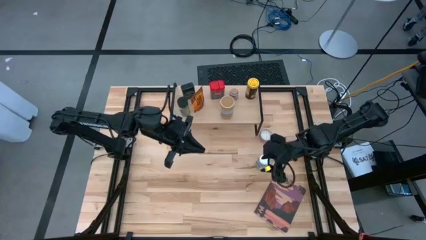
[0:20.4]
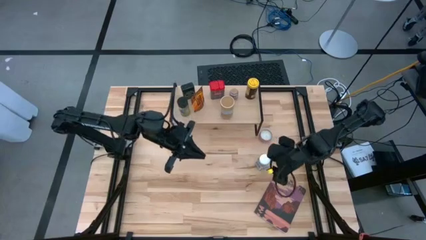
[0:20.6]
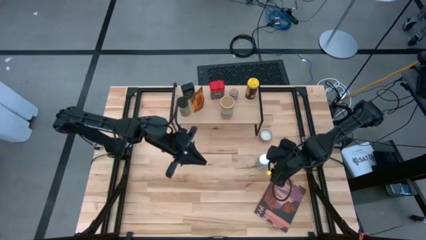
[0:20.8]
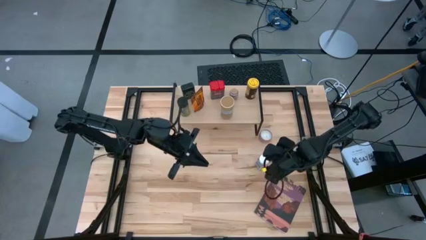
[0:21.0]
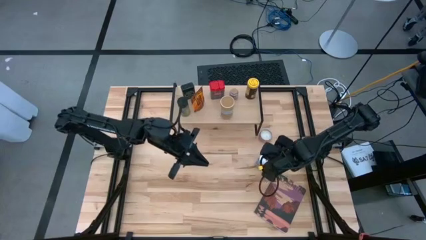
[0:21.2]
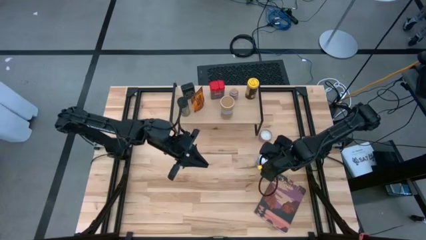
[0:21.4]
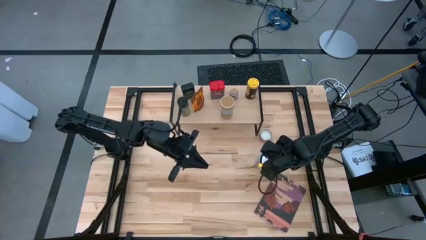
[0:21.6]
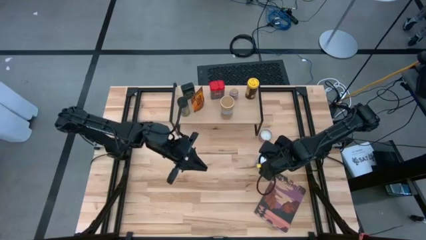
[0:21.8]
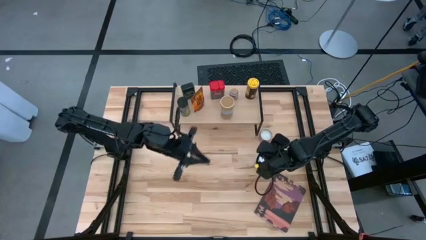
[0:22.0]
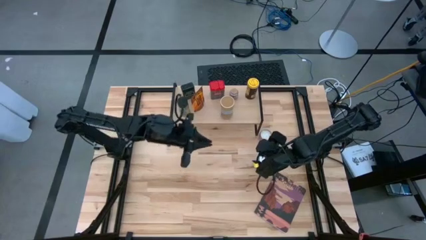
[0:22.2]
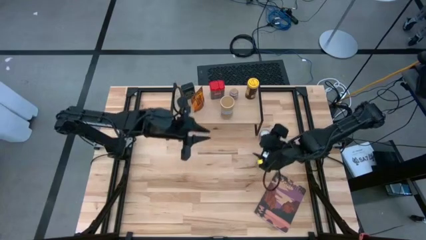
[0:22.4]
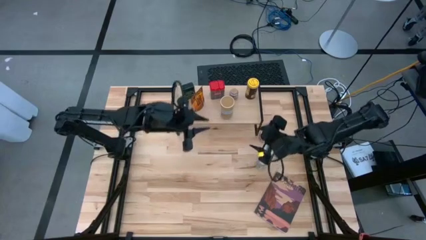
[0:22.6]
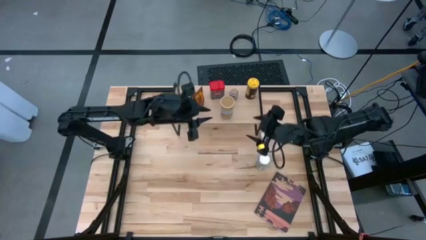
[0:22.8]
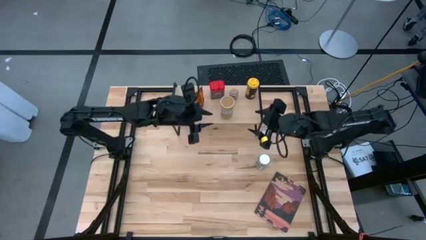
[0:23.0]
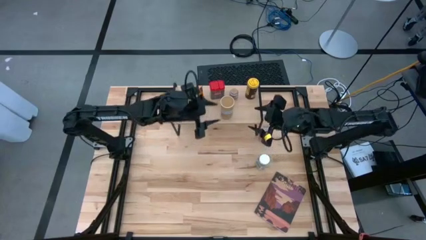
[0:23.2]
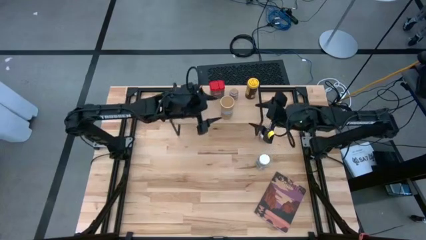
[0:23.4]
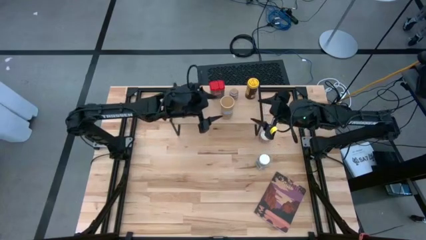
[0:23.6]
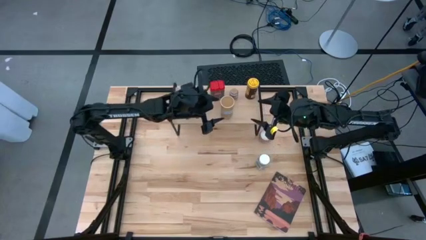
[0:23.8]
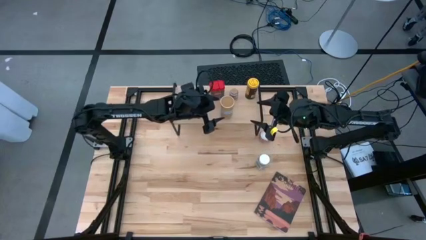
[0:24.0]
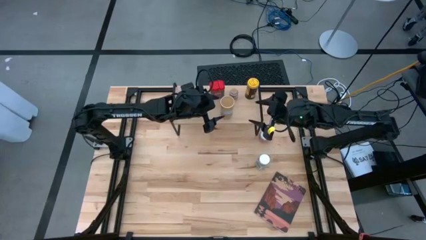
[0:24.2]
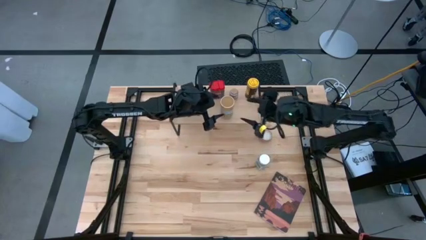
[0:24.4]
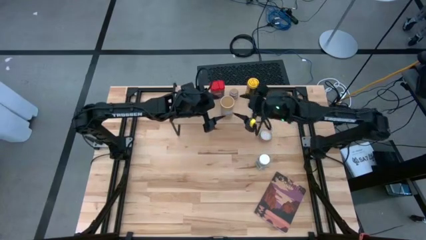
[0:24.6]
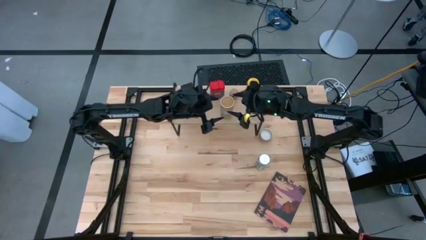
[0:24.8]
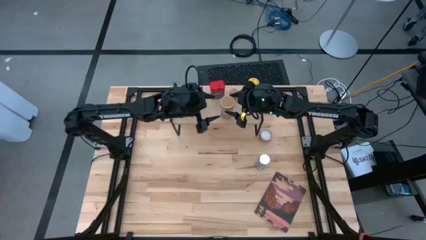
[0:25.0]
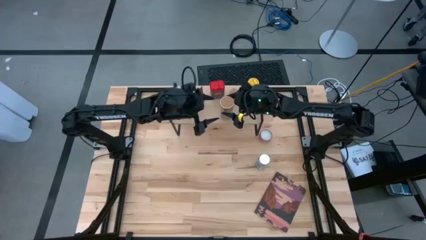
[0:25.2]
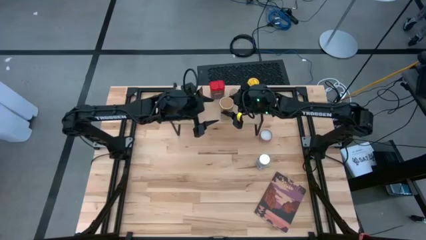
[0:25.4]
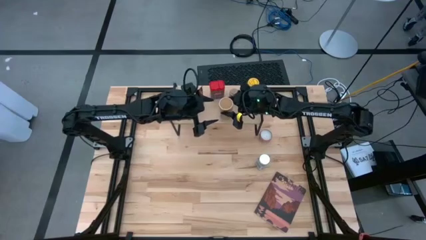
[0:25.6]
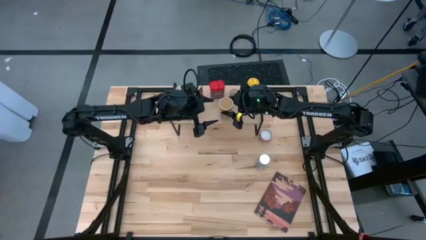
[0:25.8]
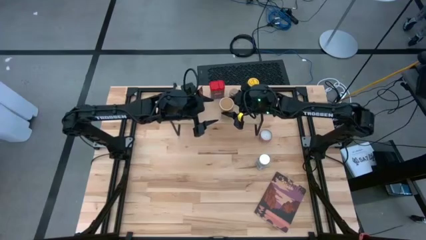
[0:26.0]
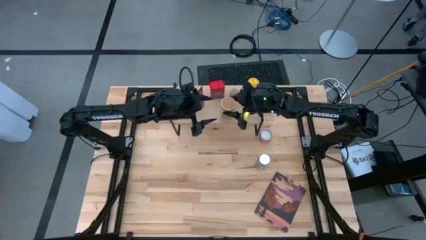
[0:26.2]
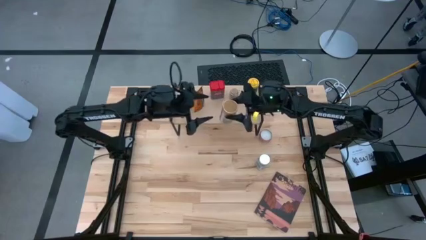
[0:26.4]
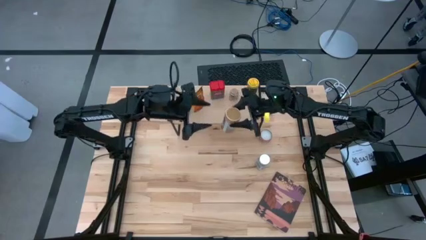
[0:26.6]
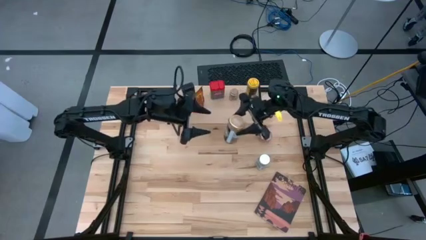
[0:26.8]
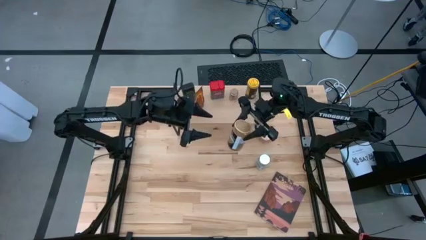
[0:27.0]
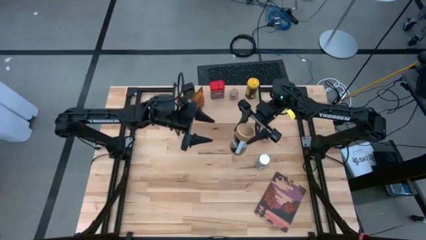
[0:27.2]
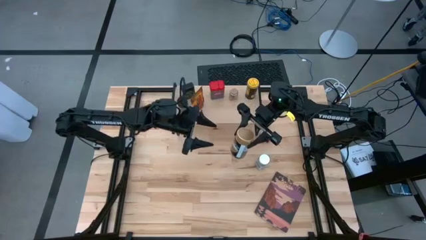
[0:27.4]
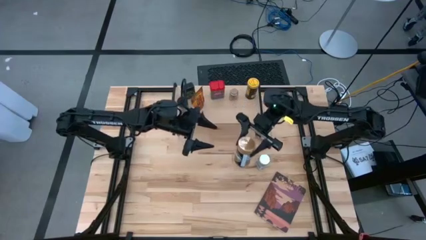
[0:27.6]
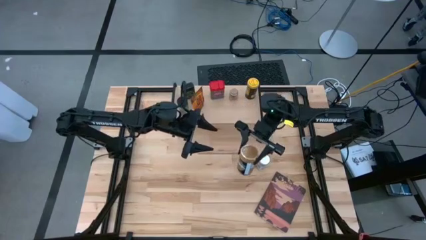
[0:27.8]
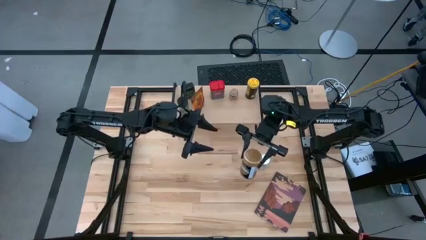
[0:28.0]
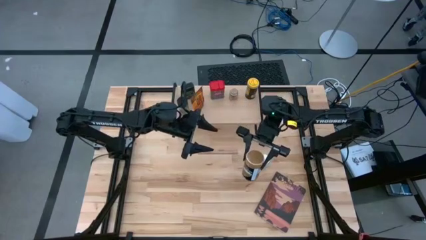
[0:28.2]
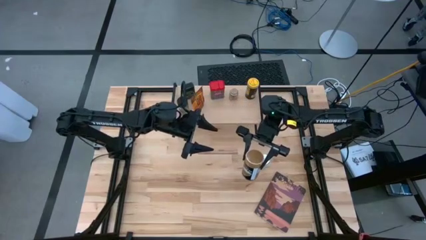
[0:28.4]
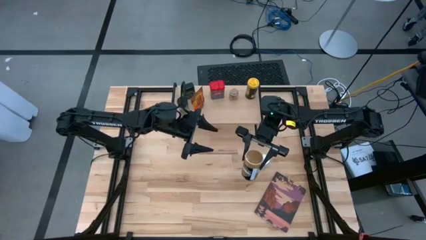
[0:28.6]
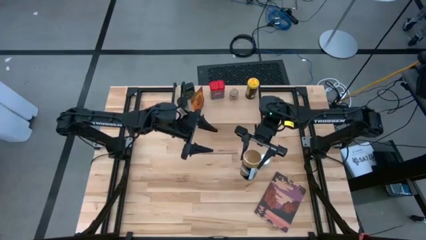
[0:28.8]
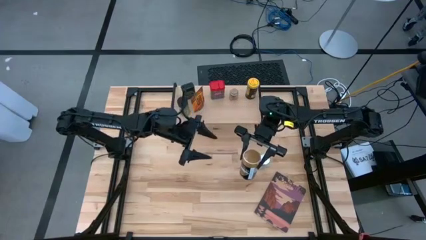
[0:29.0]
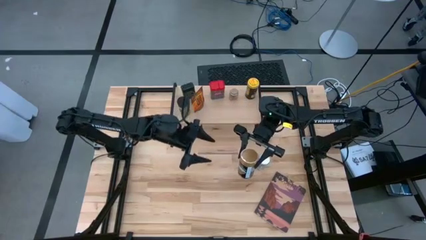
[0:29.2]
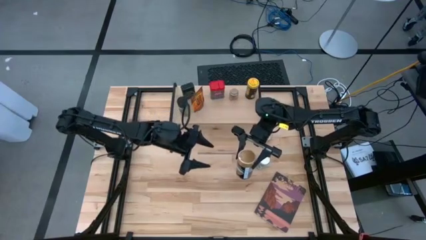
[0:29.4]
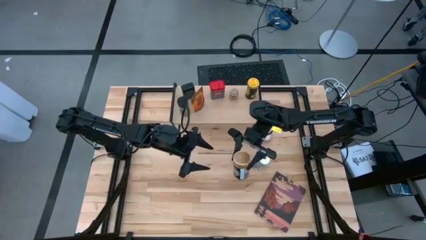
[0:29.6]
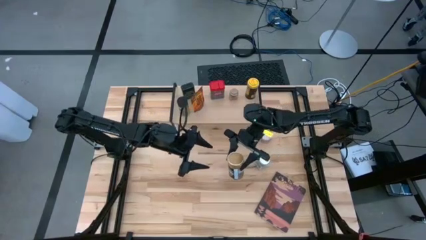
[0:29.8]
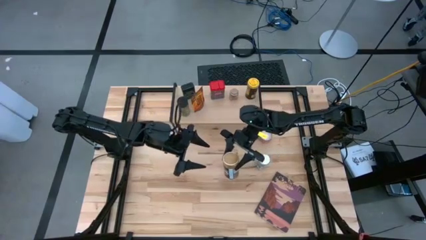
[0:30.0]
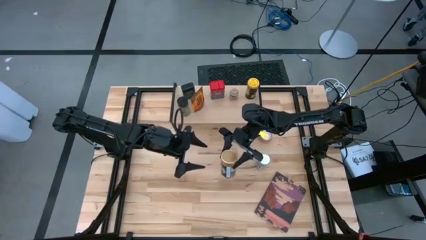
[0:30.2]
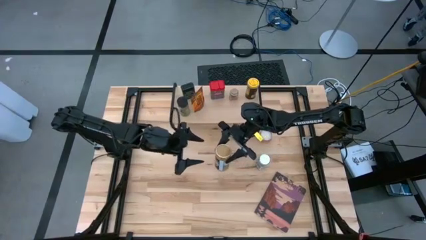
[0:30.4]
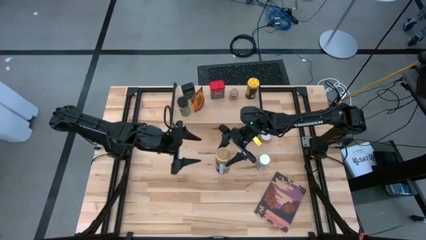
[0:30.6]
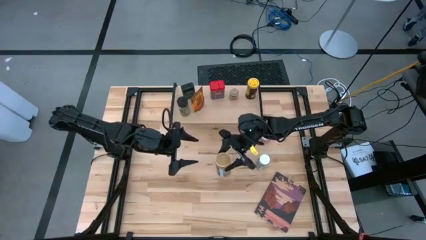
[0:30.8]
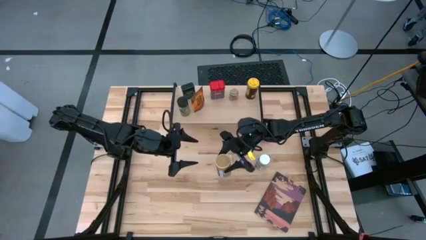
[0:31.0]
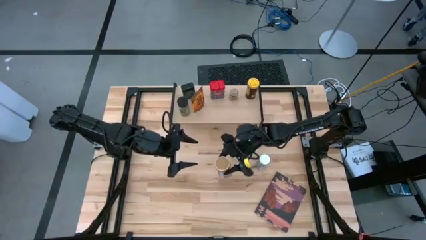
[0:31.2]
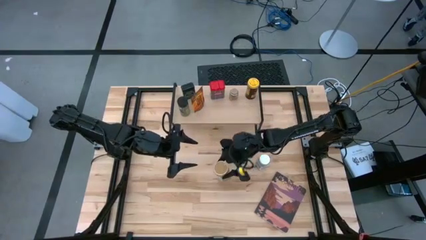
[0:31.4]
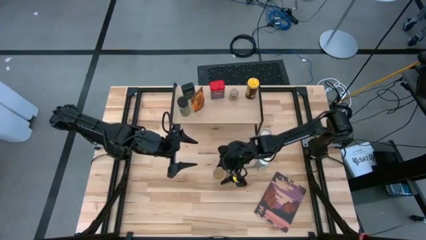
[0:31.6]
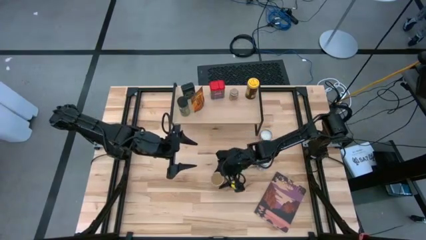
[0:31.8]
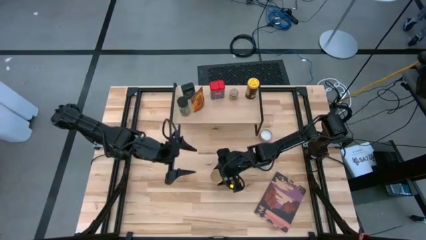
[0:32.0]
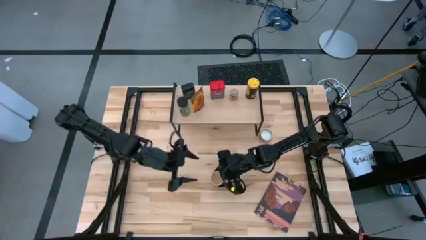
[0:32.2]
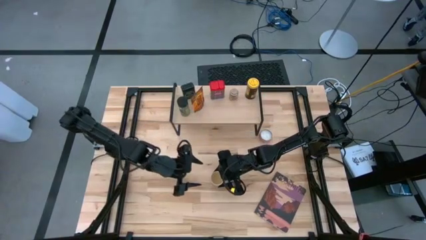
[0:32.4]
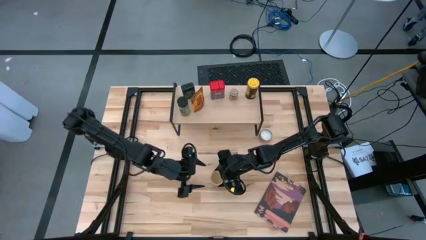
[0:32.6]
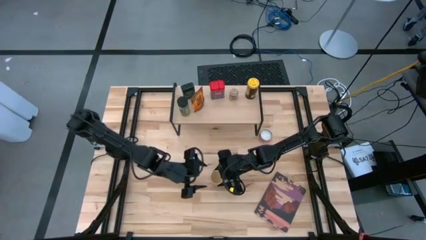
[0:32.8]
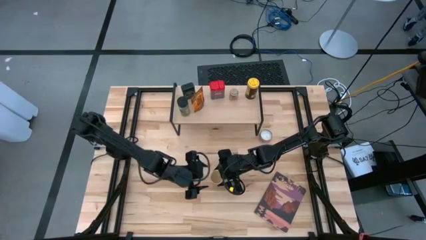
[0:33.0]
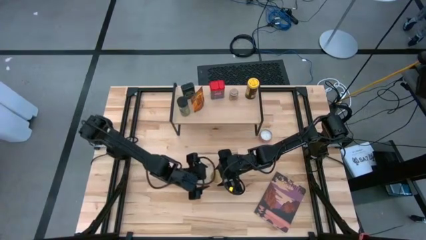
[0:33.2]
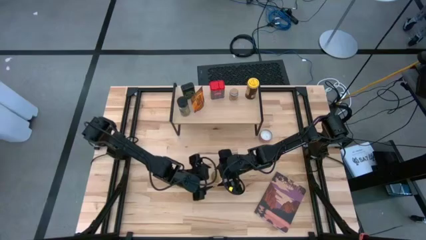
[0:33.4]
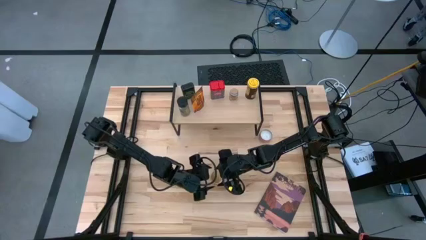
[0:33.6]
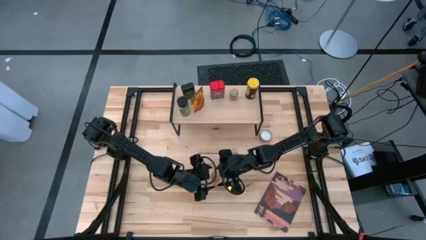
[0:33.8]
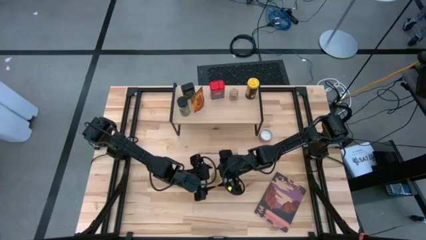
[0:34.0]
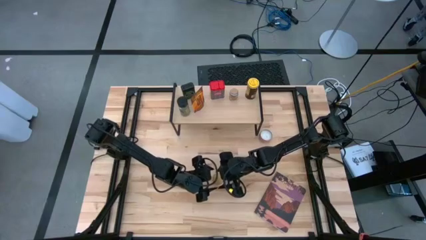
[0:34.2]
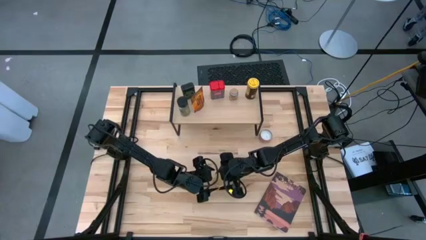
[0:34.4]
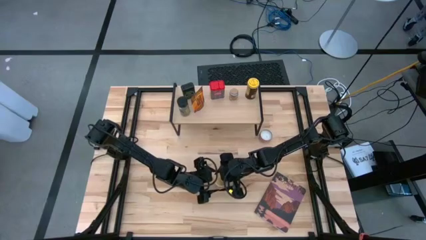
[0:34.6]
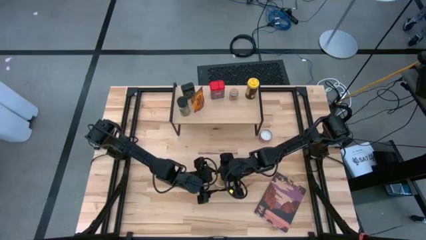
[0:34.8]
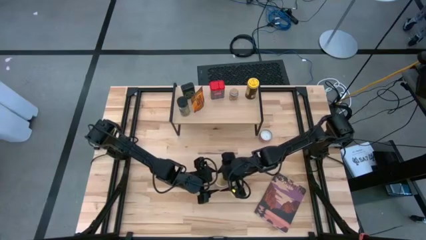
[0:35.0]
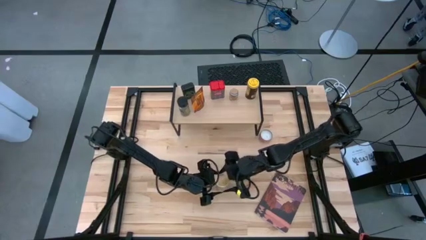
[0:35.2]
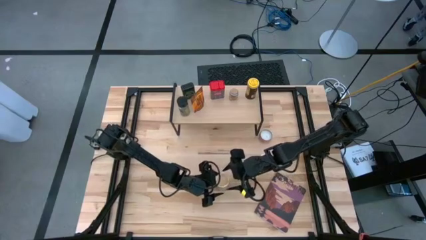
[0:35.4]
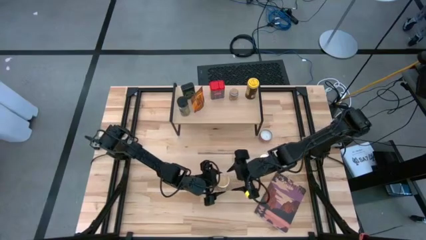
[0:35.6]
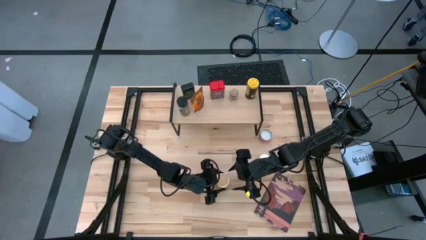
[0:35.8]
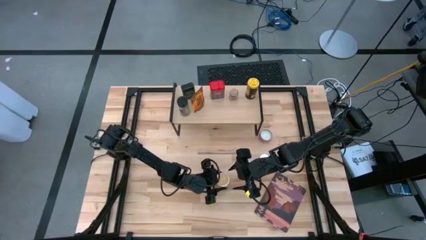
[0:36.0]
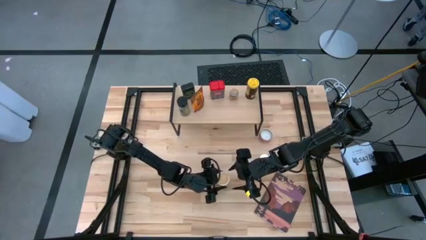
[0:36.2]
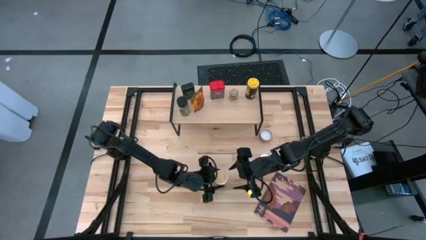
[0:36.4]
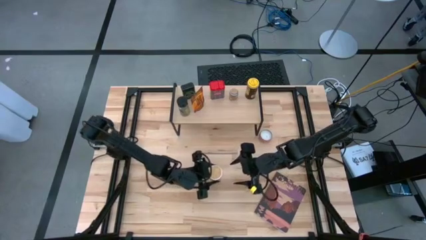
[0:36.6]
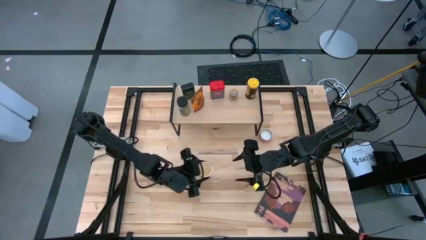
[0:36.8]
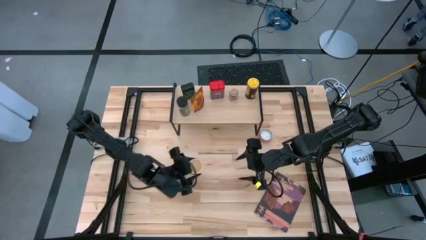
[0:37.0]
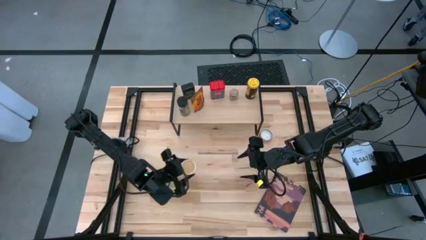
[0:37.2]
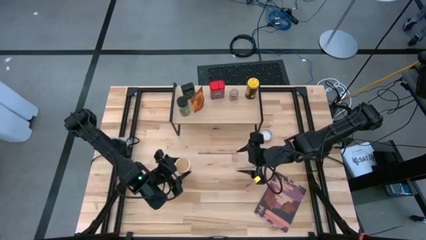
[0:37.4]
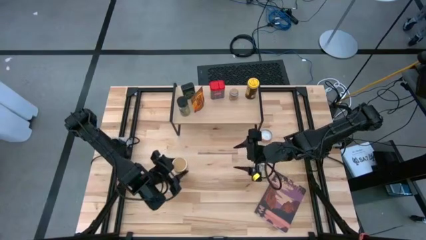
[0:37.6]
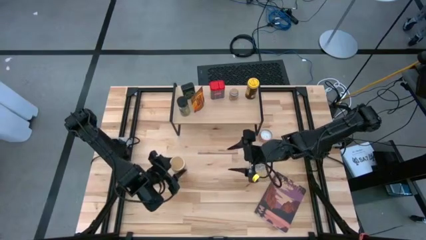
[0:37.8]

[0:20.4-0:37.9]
Task: Shelf spices
Put the brown spice bottle on the table
